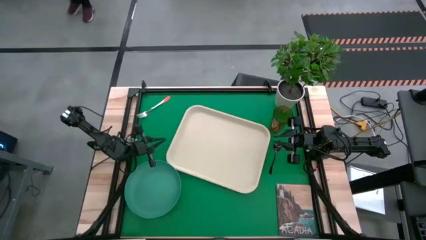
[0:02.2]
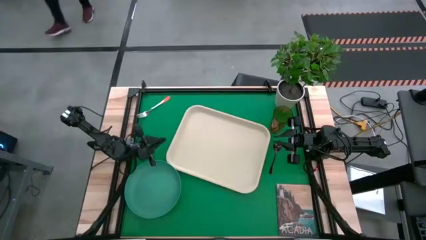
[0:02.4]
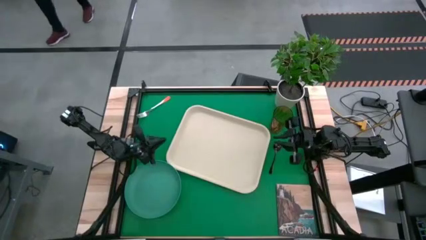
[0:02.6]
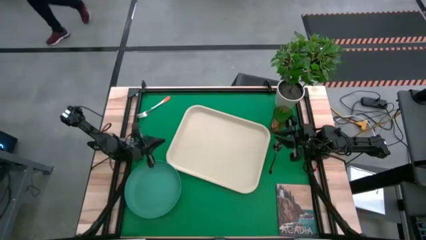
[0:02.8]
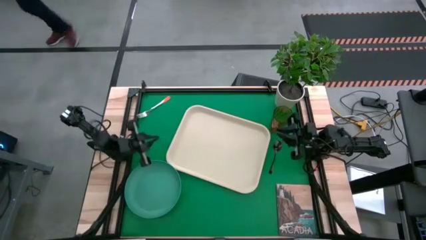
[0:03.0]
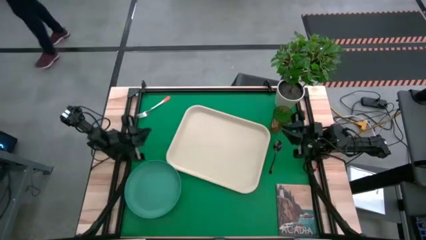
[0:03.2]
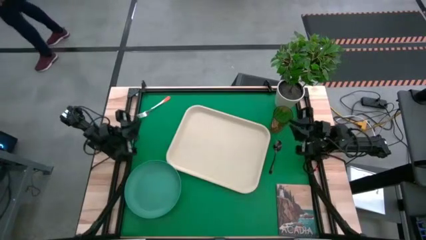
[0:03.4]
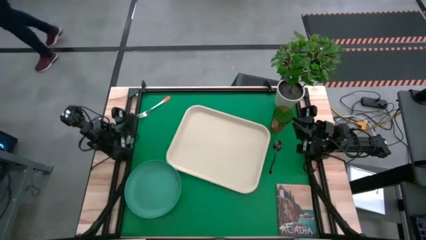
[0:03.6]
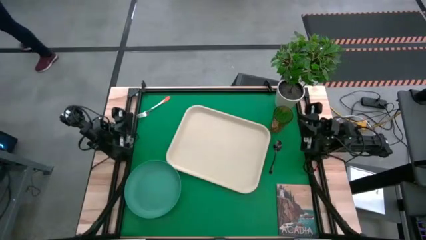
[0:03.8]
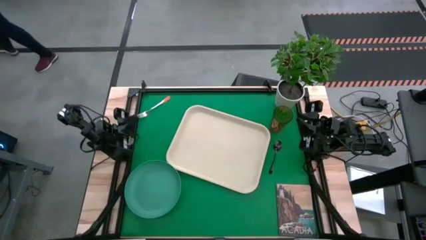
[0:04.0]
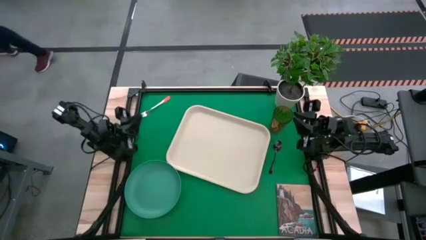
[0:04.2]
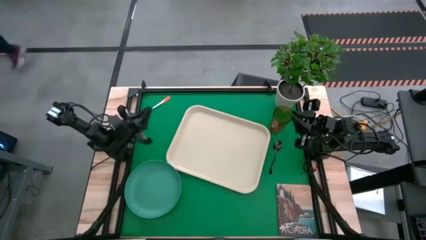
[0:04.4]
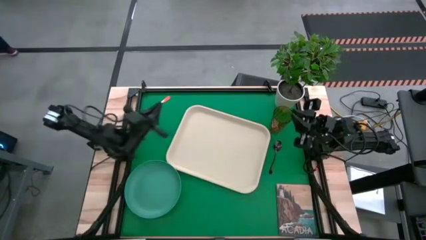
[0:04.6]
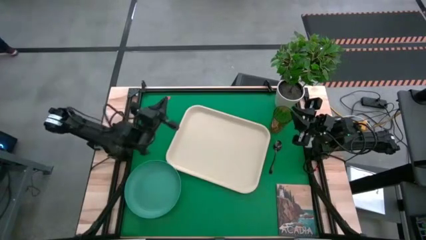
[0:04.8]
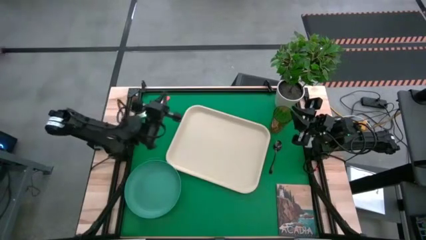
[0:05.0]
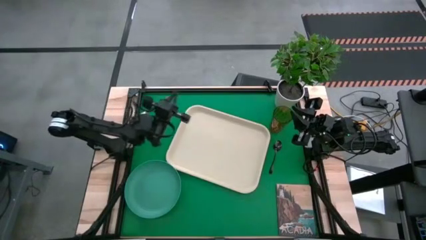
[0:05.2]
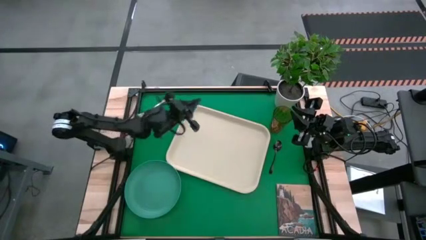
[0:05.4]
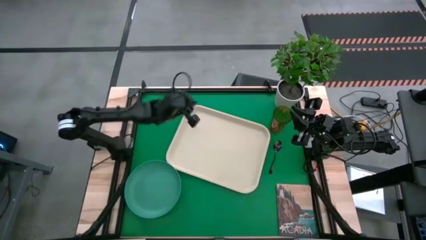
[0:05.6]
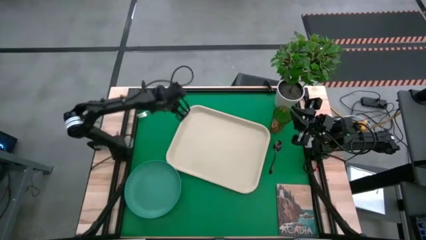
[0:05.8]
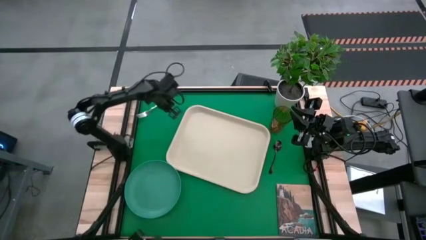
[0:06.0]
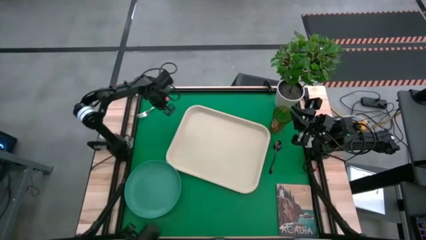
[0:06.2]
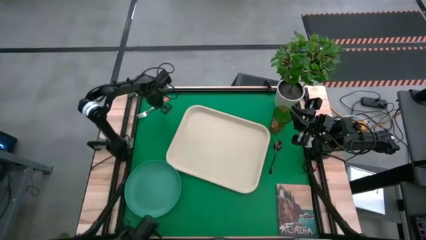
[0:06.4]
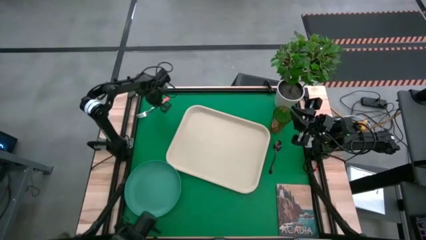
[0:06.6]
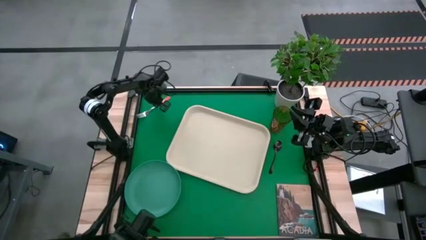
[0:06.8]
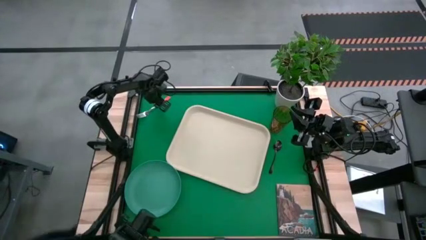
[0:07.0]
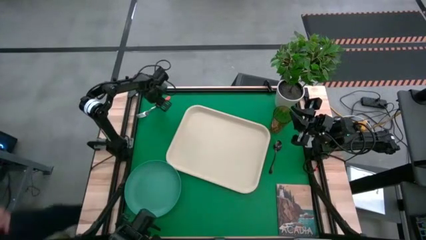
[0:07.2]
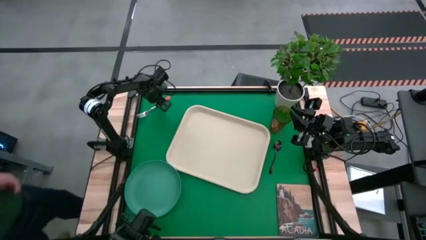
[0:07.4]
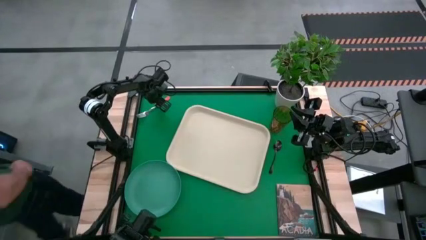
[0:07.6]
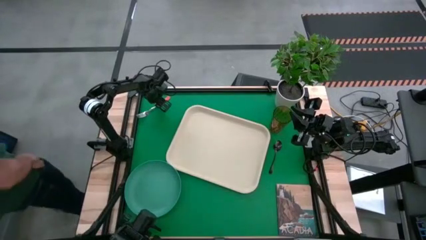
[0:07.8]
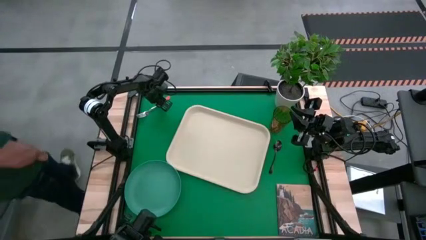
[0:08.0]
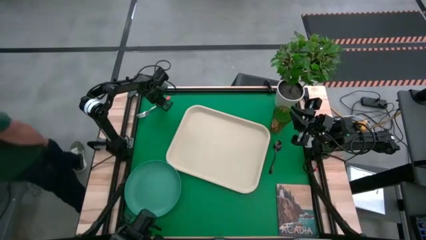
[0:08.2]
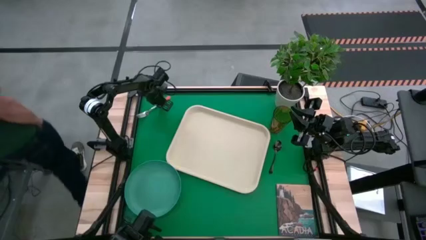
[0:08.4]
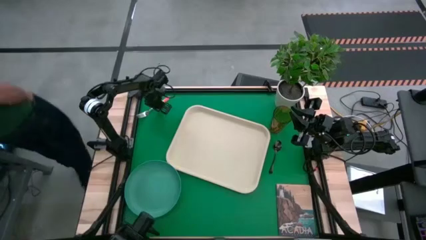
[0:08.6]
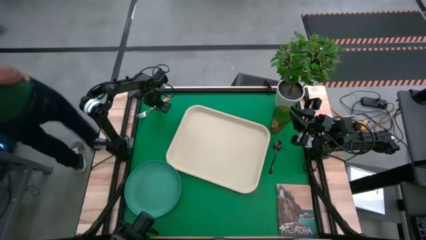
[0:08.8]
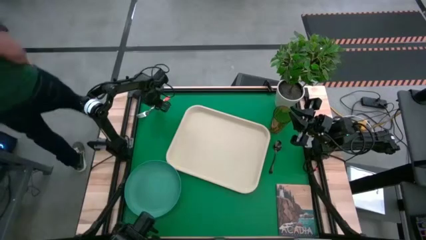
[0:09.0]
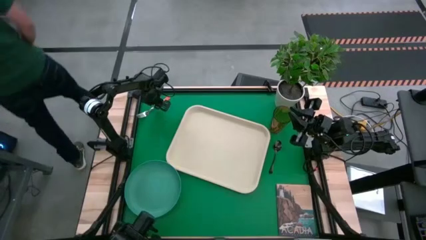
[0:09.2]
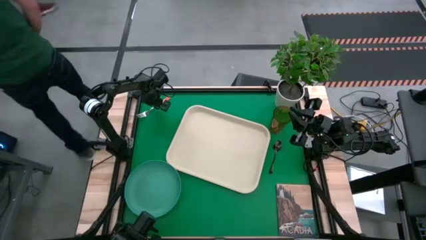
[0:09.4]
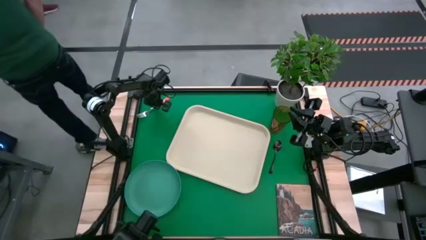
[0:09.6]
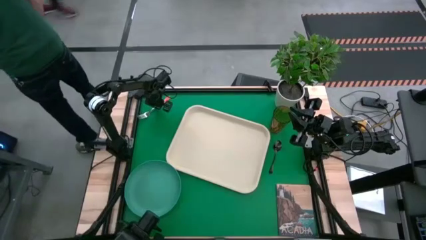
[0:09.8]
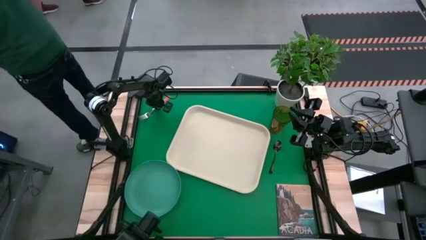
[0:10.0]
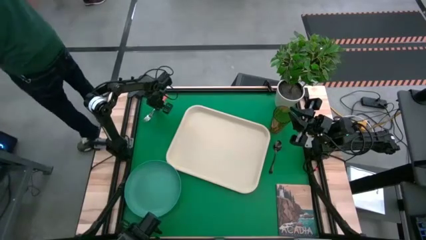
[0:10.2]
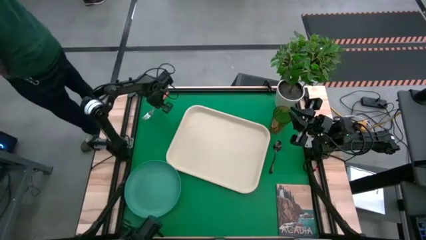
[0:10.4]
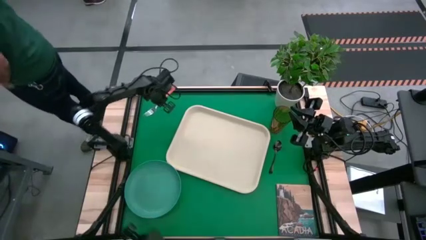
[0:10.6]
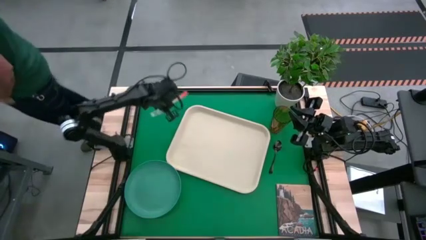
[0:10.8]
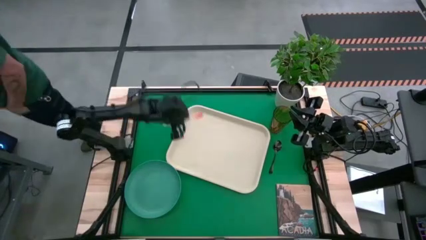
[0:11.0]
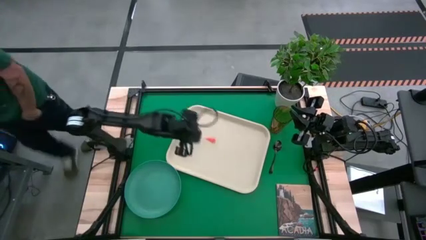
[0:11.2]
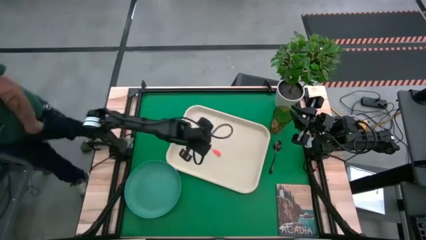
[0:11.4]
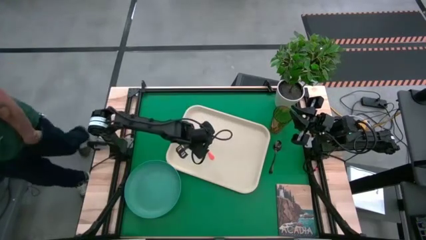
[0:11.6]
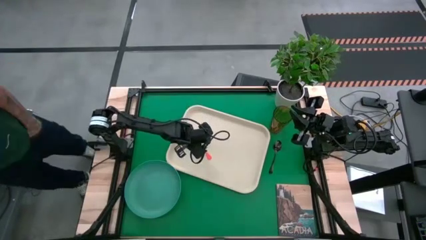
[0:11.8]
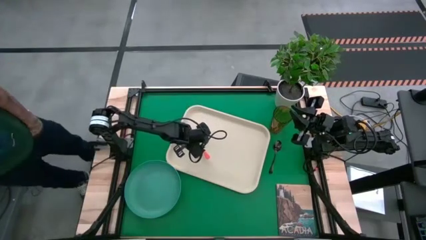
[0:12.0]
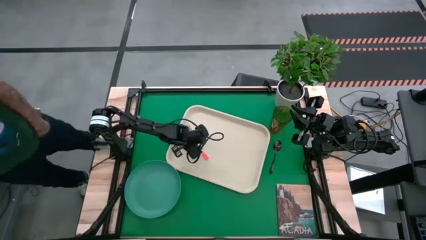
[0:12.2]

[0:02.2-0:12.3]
Task: Pick and place plate/cup/fork/spoon on tray
Put the orange fork on the left of the white tray

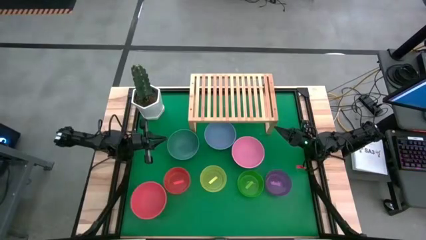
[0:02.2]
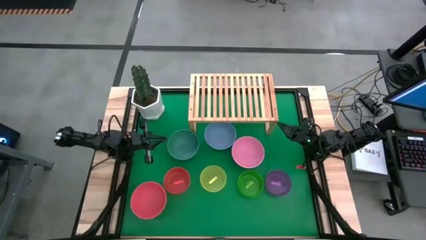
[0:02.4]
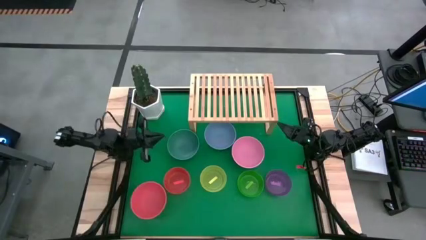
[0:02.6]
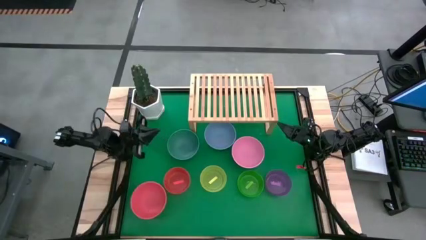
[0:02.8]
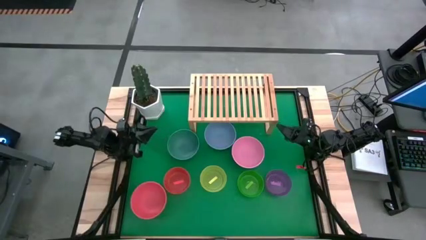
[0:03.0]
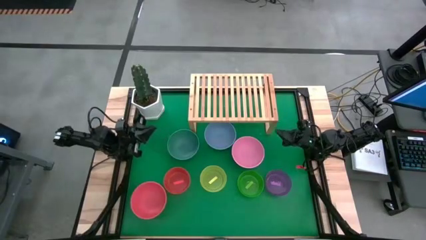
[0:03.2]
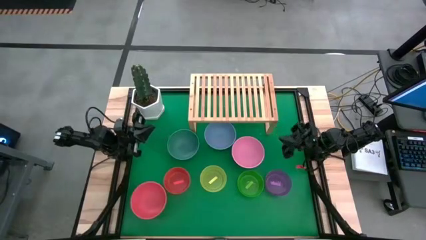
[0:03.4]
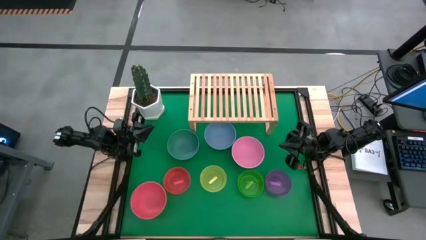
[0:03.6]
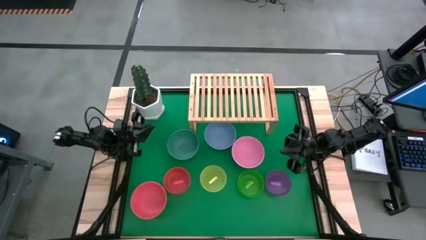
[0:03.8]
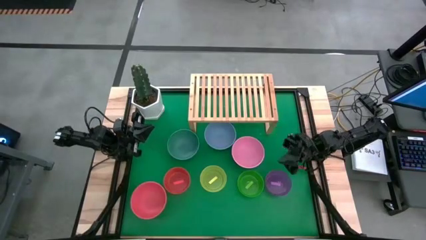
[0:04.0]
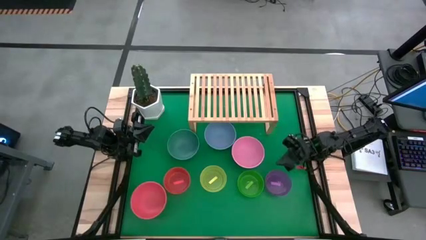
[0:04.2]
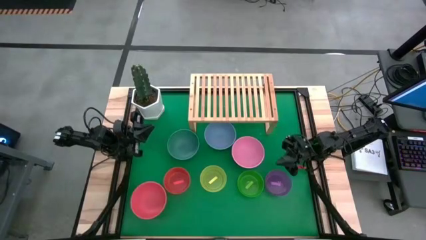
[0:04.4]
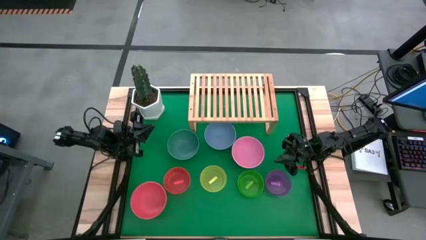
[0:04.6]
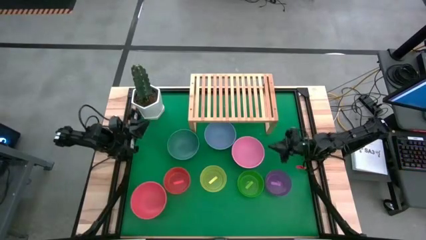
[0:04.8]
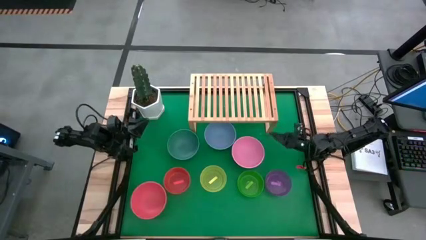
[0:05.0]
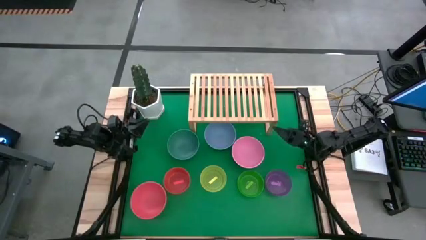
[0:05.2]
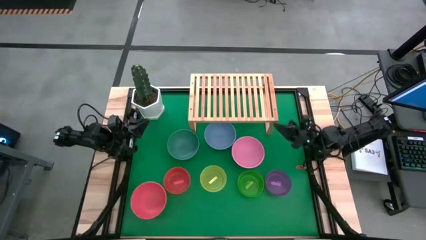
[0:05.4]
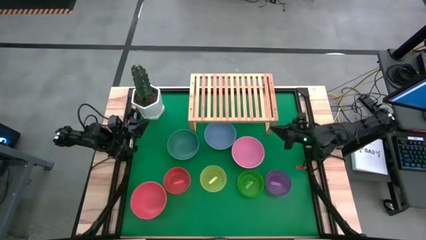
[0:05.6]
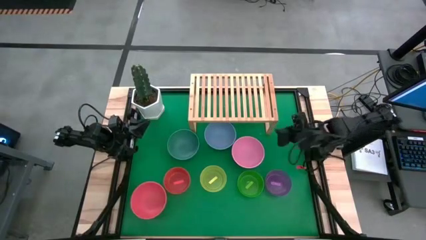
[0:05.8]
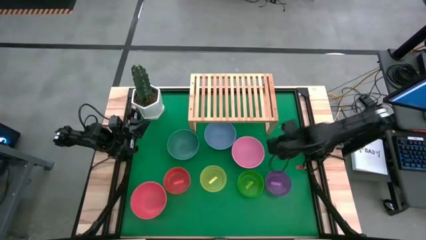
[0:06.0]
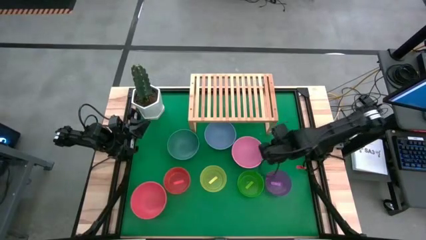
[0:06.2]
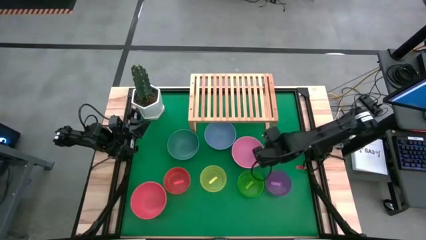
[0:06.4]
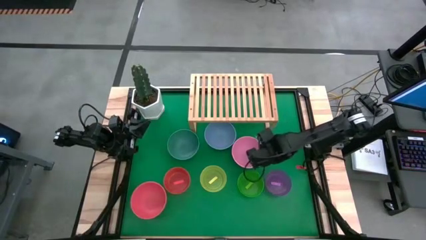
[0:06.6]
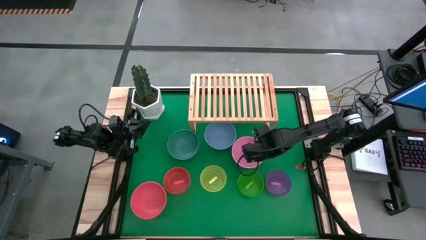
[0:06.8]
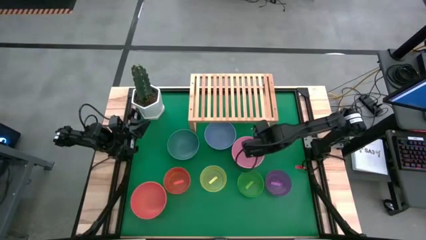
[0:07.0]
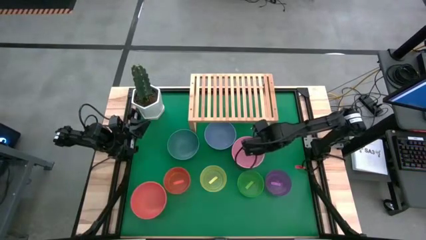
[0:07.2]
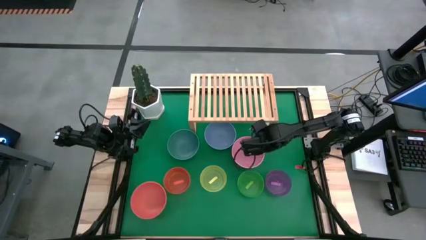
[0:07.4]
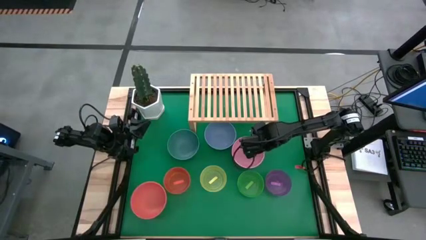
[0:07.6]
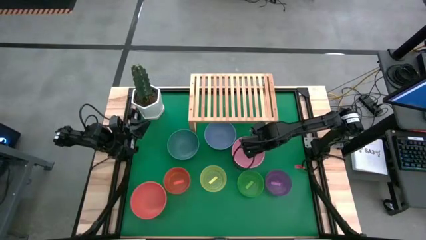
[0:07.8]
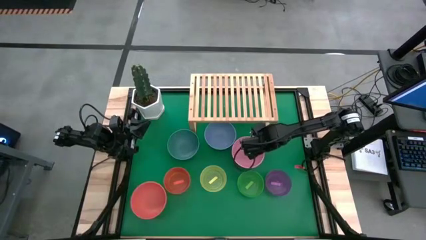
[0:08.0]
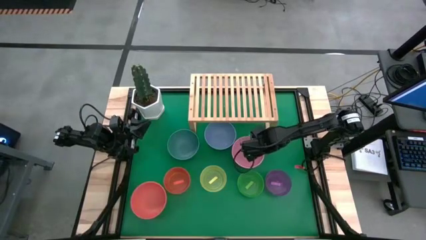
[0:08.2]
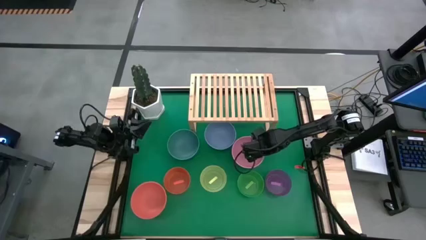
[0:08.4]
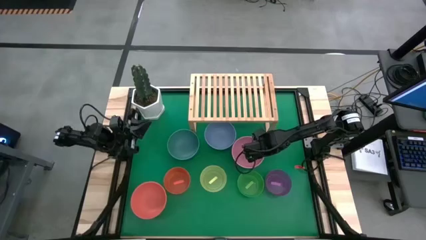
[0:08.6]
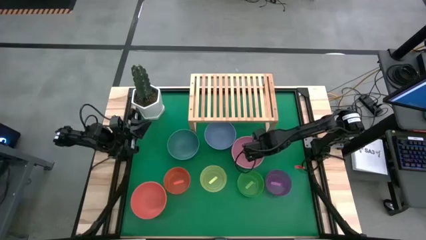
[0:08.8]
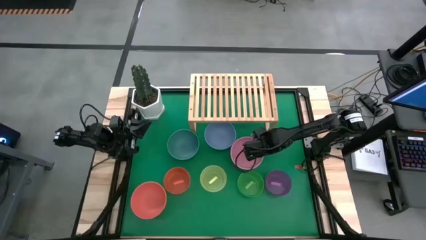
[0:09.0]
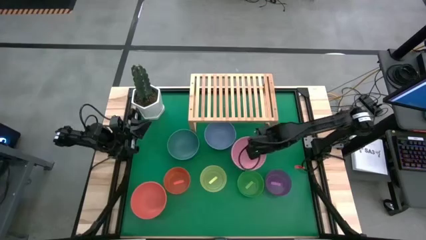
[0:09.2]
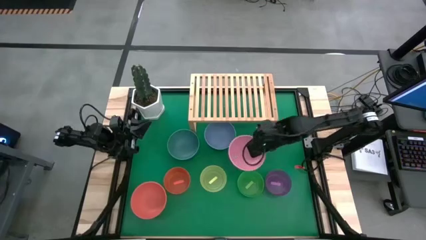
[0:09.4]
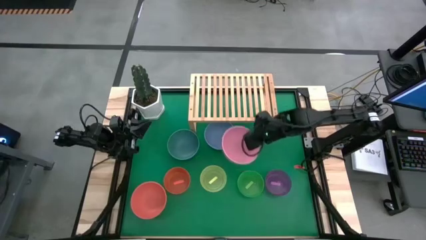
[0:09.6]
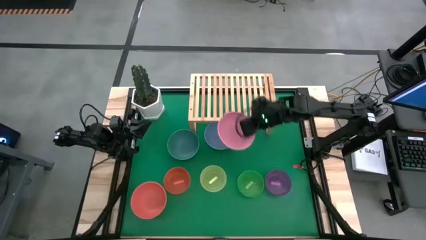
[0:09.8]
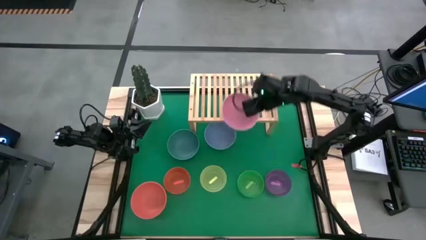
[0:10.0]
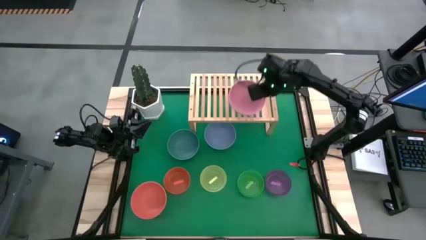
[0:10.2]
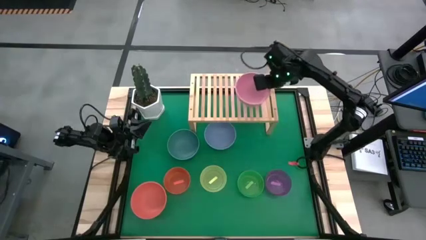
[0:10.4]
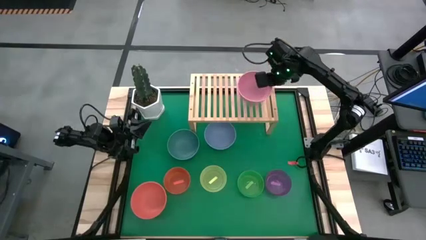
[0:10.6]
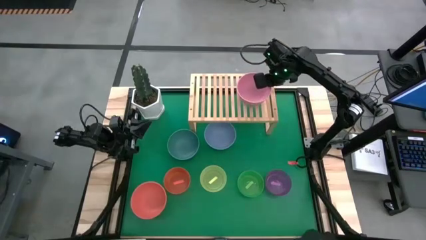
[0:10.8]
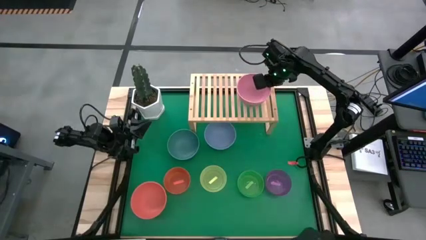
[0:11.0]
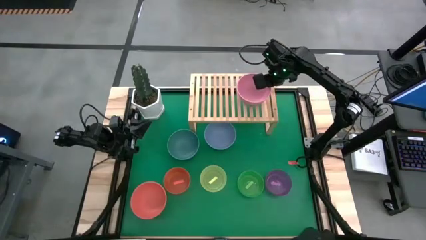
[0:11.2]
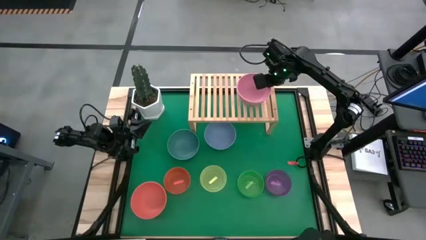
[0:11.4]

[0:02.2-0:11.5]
Task: Place and stack bowls onto a shelf
Put the pink bowl on the shelf
